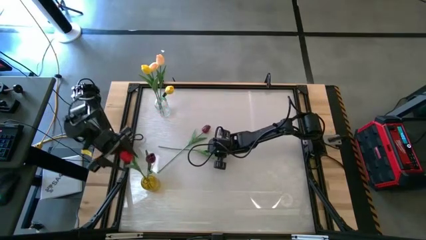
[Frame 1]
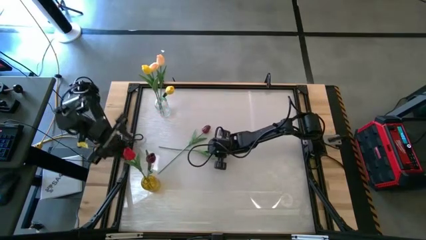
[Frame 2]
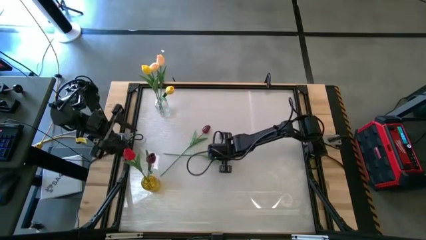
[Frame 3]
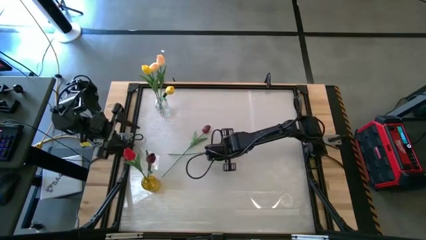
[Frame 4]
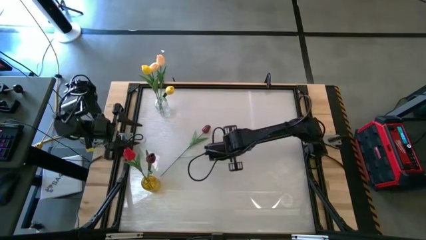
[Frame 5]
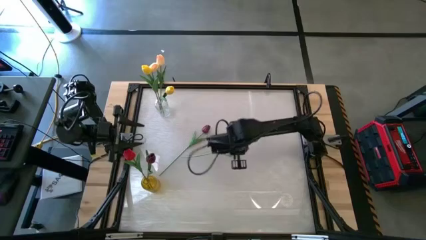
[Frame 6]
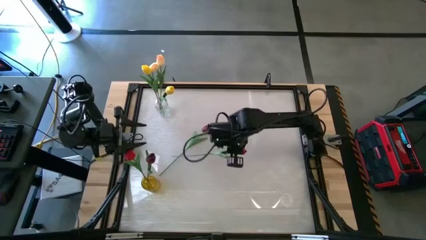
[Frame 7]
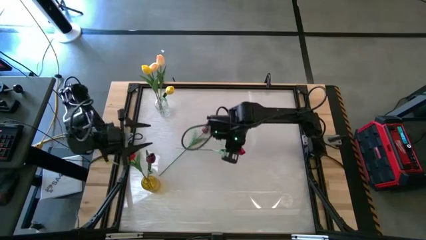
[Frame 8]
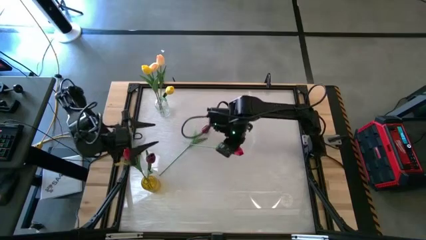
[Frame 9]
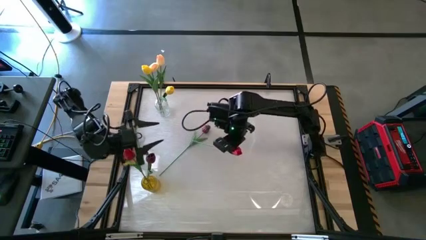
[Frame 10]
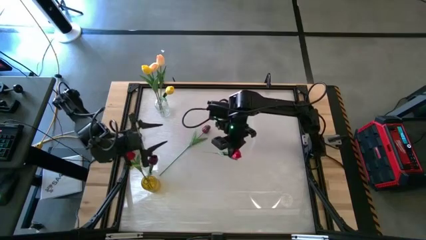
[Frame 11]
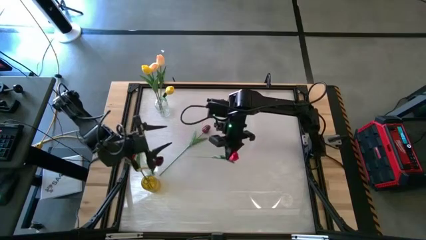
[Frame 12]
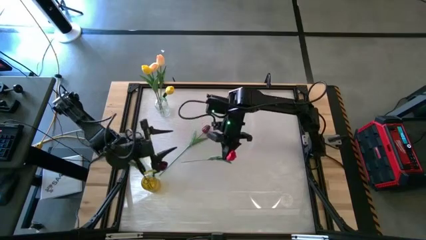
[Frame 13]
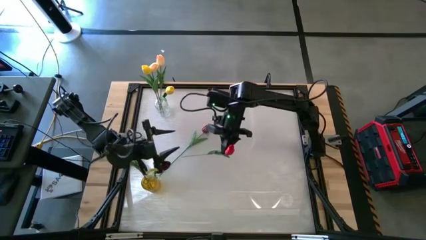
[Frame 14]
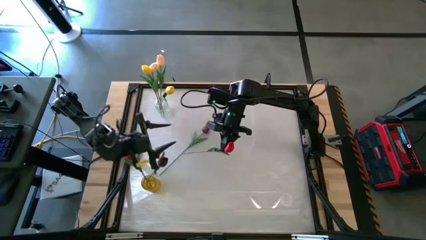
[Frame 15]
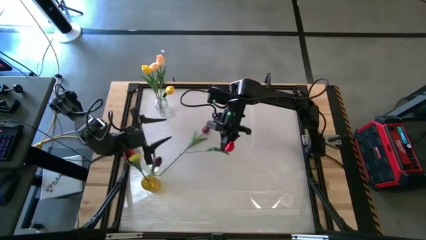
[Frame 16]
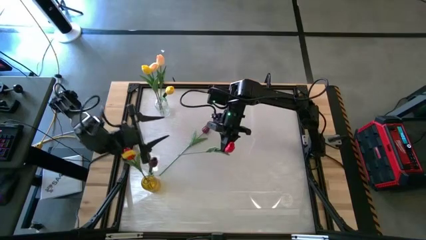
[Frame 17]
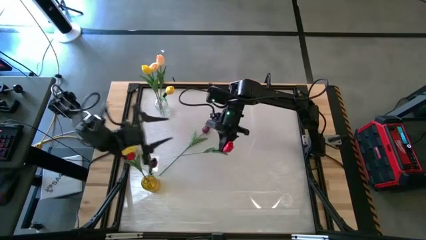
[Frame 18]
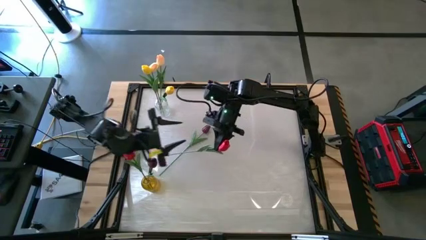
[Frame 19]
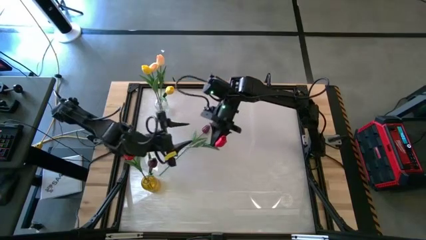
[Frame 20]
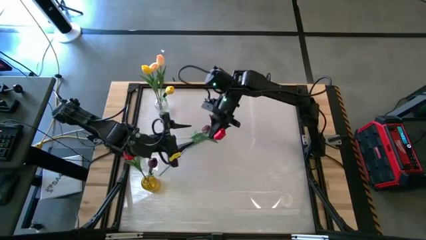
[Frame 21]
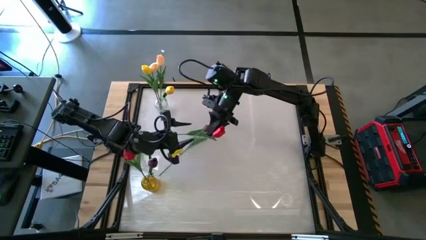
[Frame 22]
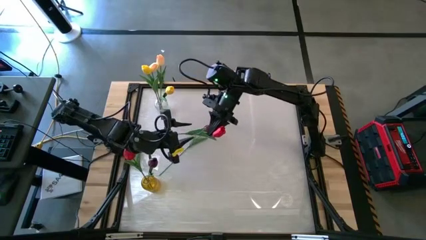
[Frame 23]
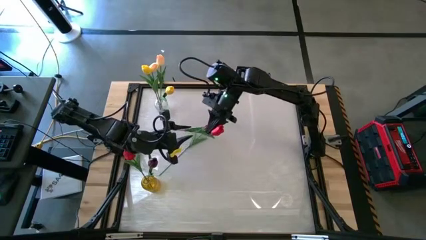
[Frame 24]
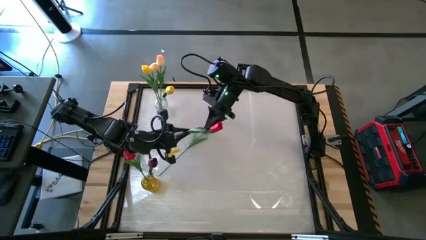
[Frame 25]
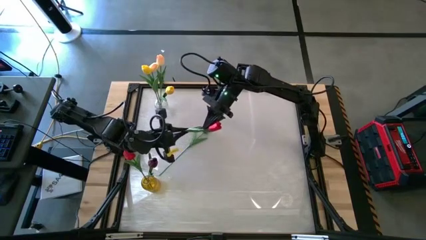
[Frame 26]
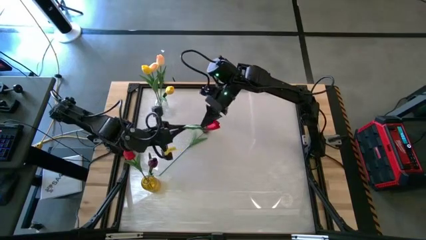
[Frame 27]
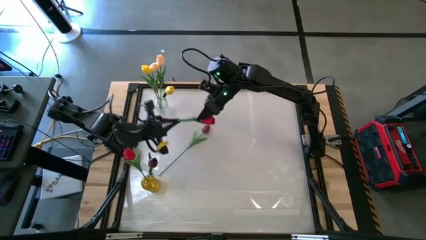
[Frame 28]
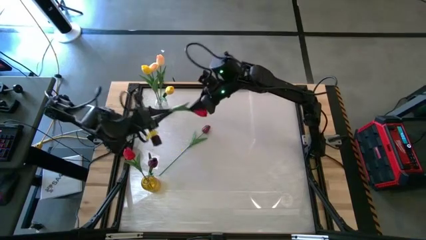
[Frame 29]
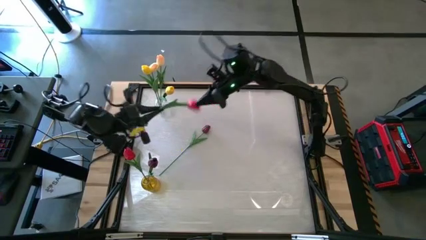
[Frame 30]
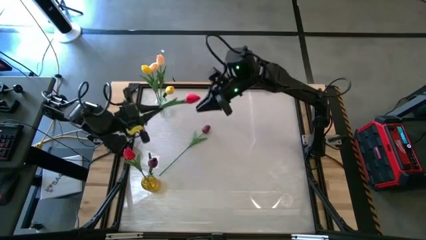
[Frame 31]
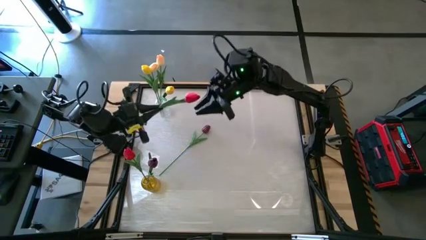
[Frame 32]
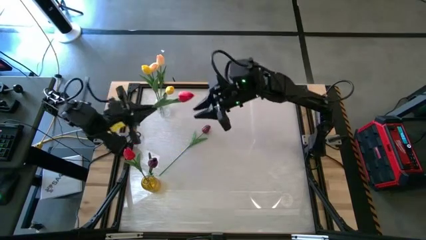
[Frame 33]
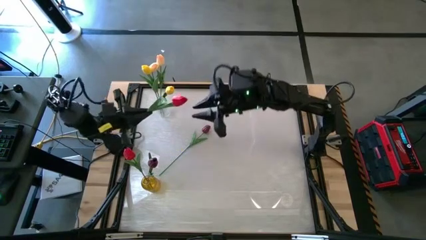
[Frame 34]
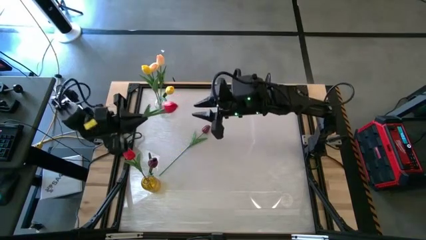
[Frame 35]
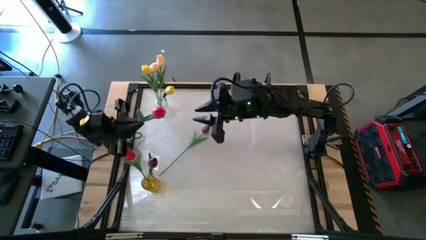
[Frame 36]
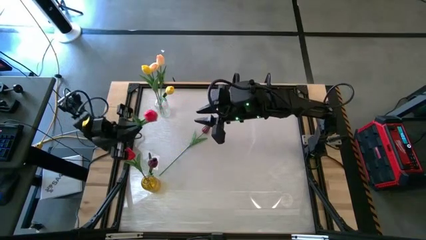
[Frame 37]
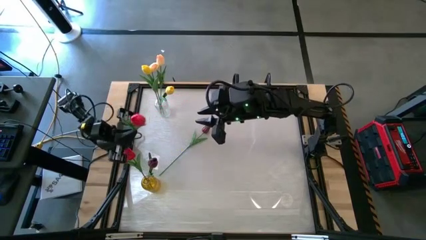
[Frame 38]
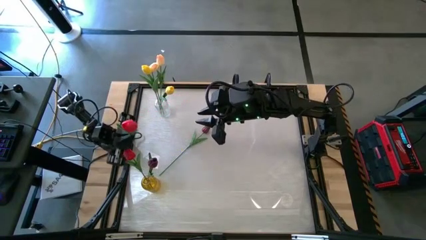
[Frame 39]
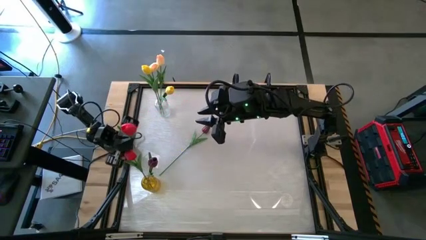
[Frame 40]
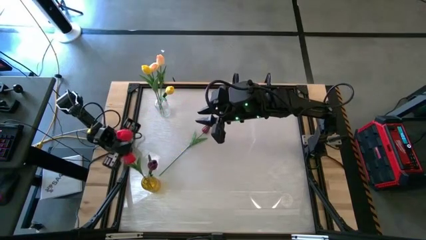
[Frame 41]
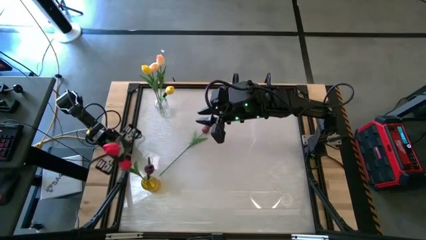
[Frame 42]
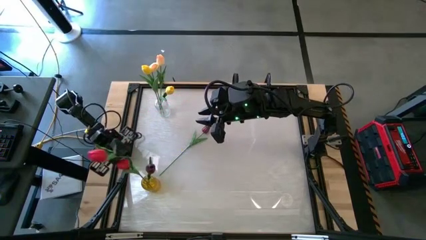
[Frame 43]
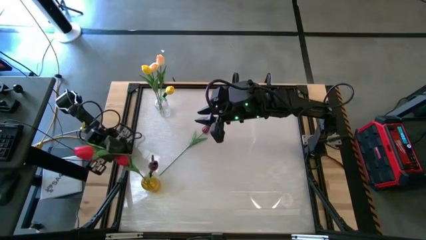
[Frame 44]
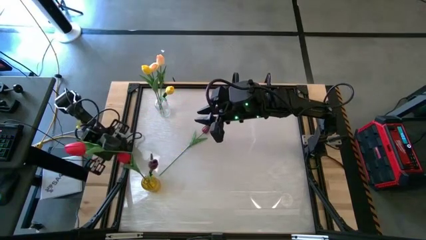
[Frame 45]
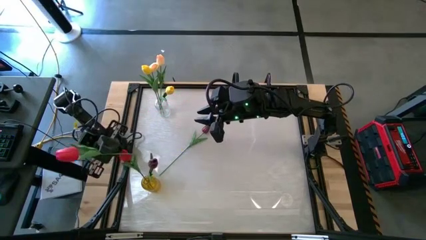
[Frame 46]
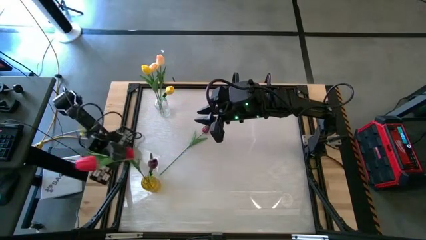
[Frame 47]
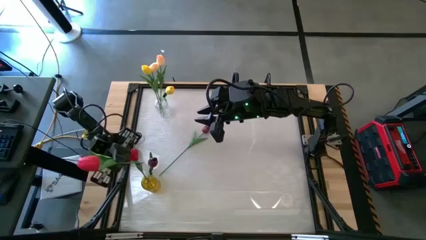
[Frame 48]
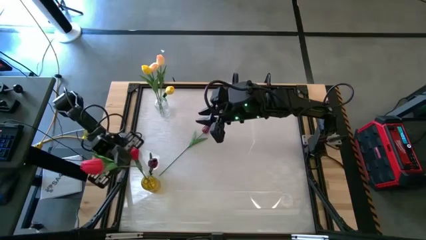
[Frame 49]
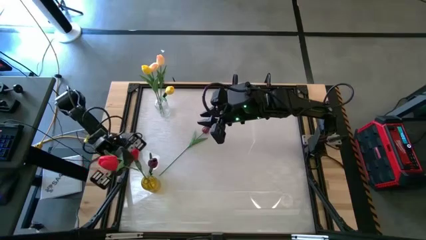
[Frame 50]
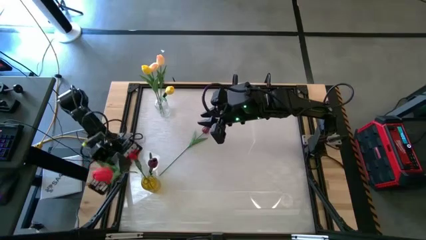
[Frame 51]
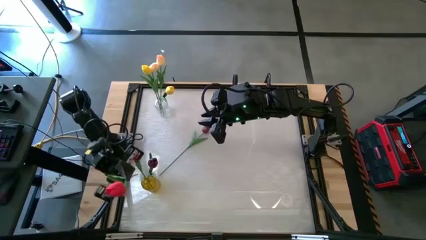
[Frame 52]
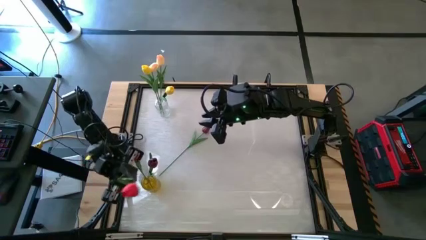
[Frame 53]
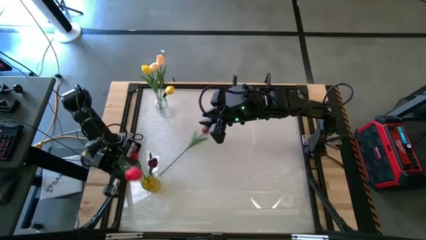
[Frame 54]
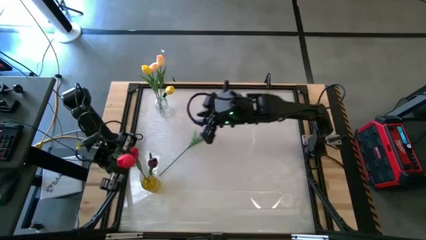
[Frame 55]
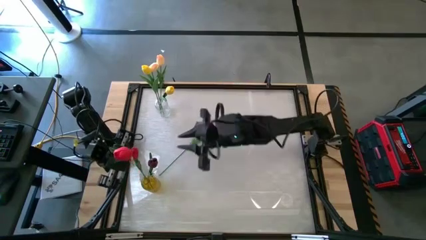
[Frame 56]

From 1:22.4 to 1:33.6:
Task: Sort flowers into vase by color
Put the red tulip into the orange vase

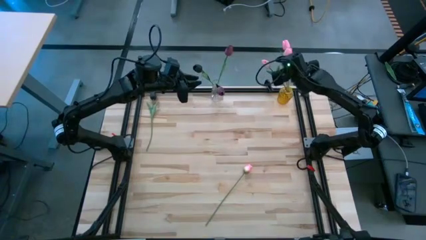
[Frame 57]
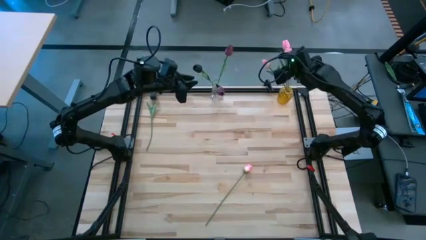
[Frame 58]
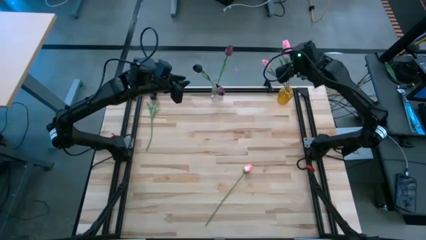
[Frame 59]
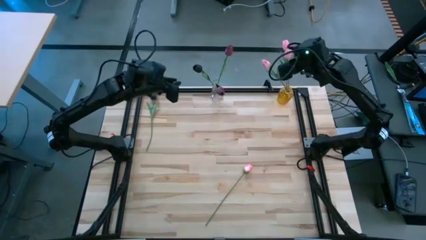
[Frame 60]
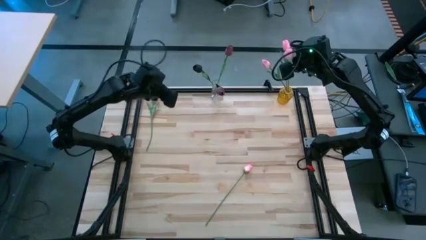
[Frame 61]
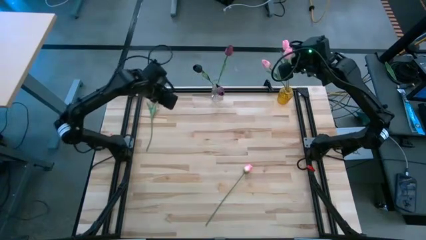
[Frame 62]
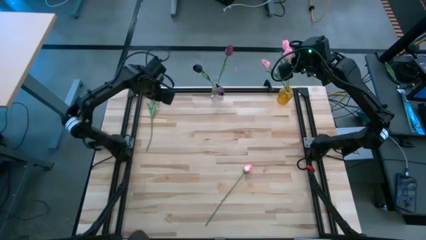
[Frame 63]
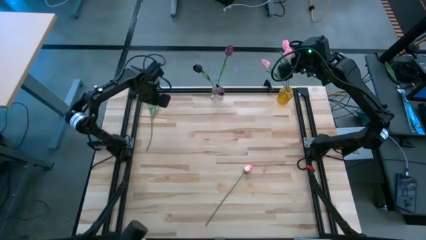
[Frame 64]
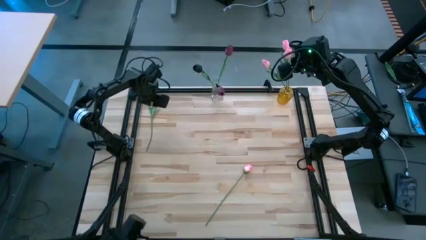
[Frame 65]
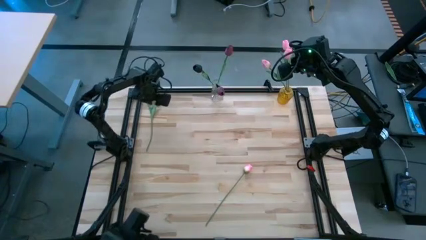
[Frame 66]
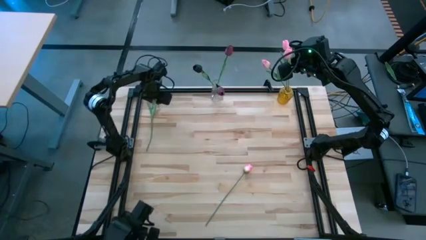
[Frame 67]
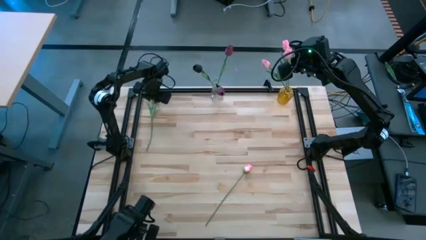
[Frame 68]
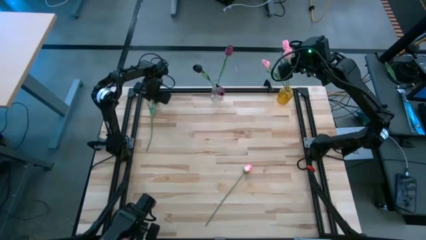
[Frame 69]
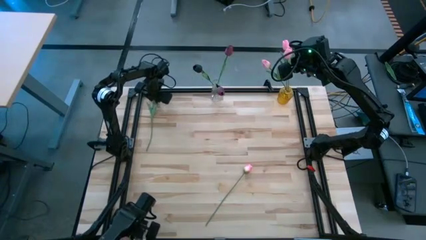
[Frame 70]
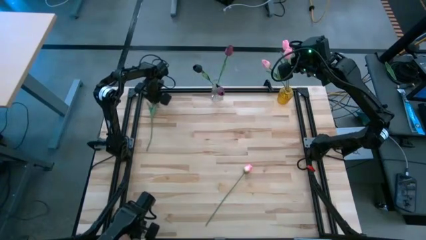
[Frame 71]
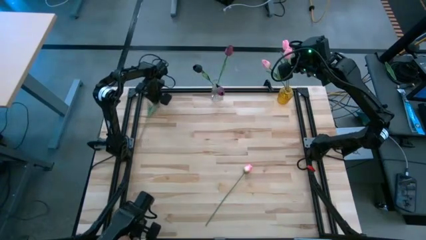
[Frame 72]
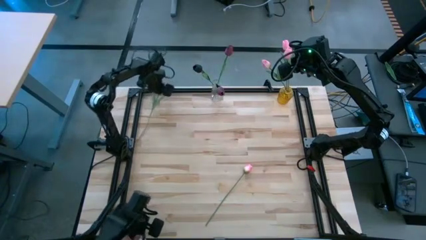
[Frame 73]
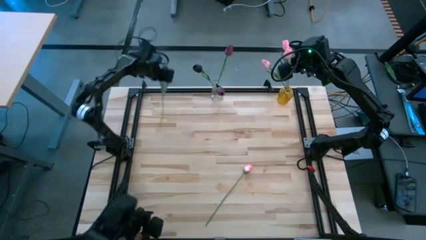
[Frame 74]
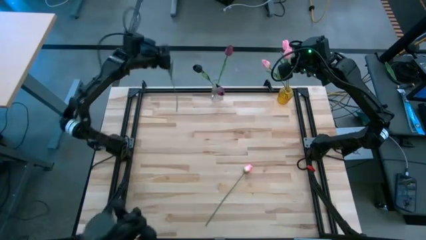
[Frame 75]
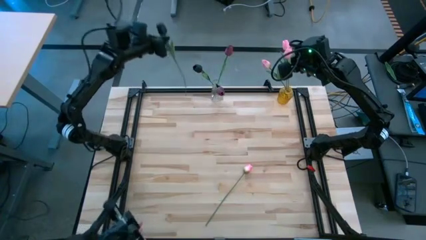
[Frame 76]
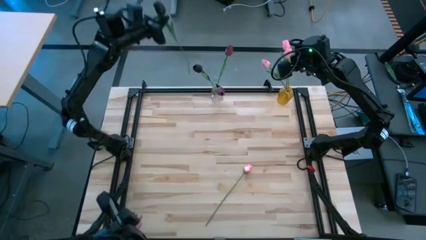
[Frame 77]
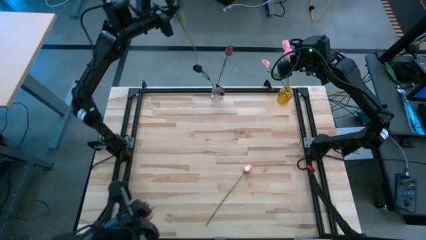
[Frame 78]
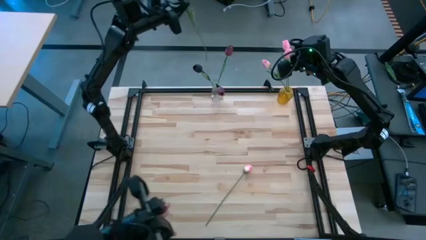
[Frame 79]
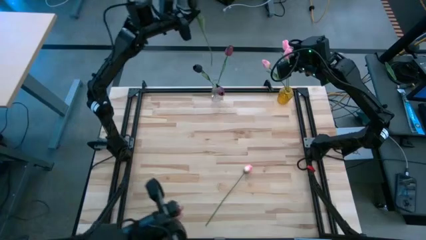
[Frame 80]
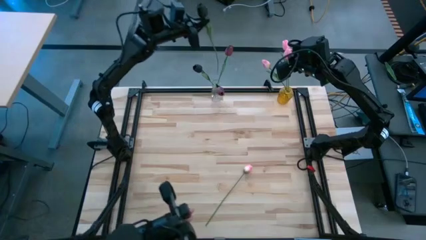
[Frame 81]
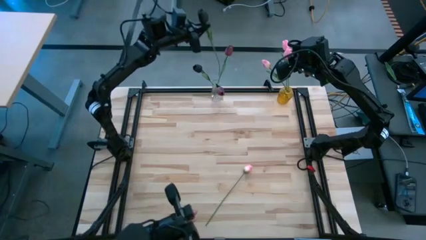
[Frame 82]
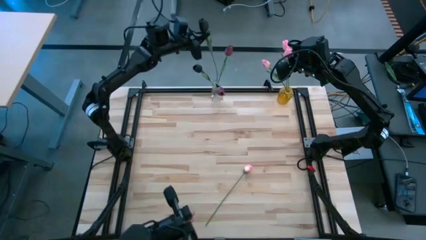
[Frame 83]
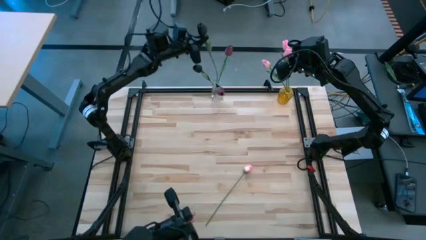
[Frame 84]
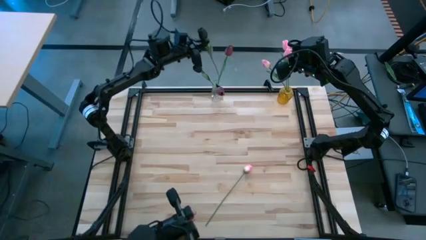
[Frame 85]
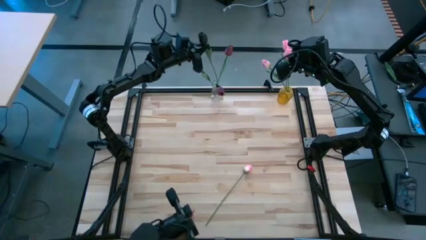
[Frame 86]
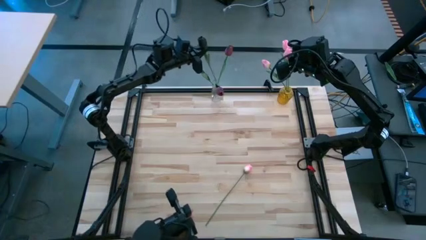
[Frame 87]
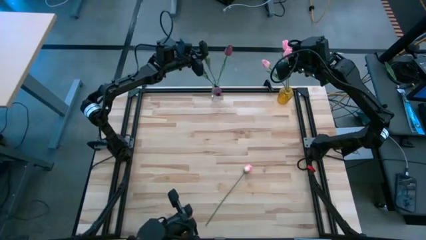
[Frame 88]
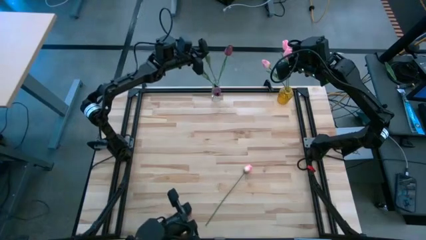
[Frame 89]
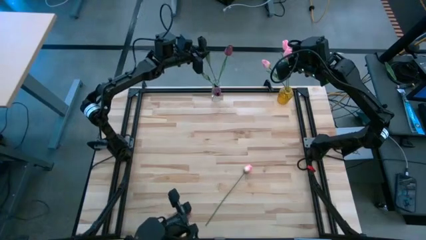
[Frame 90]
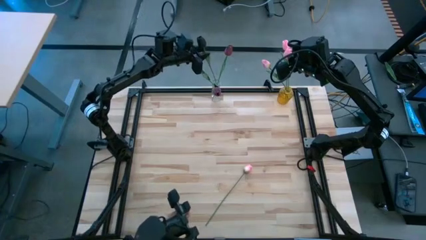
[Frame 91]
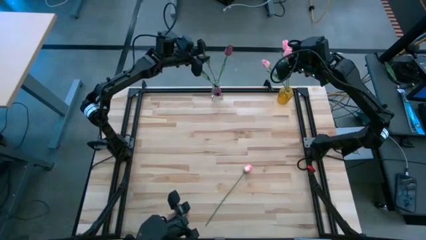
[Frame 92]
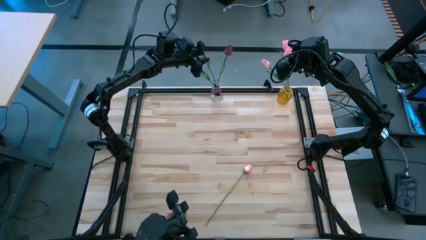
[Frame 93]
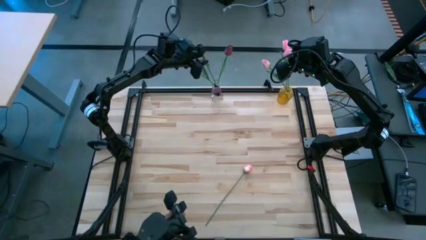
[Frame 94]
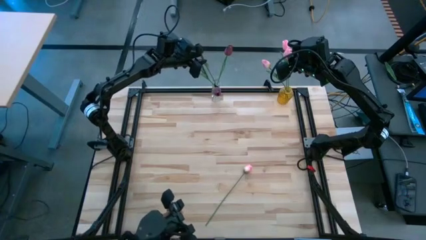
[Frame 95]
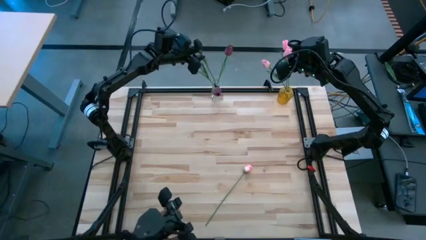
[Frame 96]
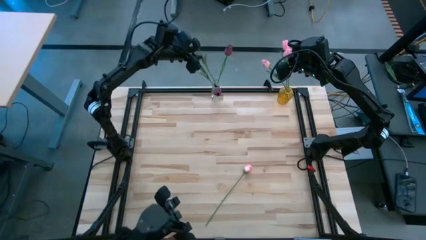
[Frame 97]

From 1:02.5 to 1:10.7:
Task: Sort flowers into vase by color
Put the black tulip into the crystal vase
